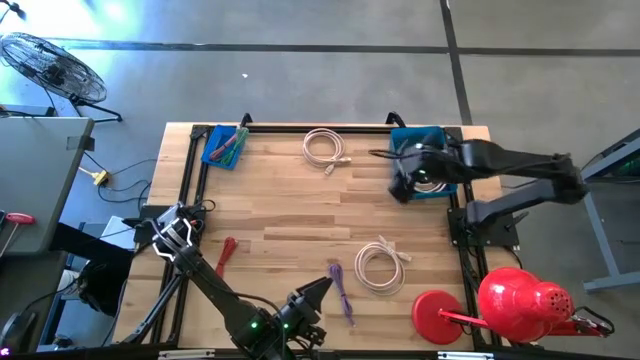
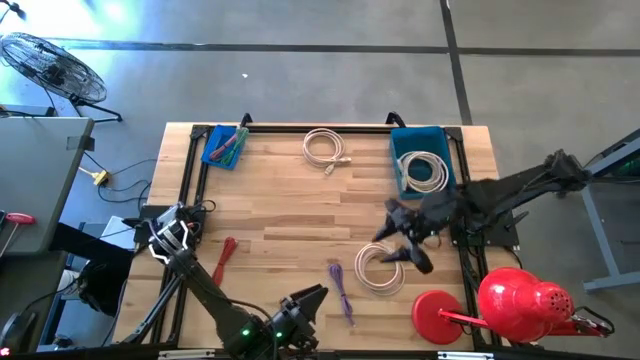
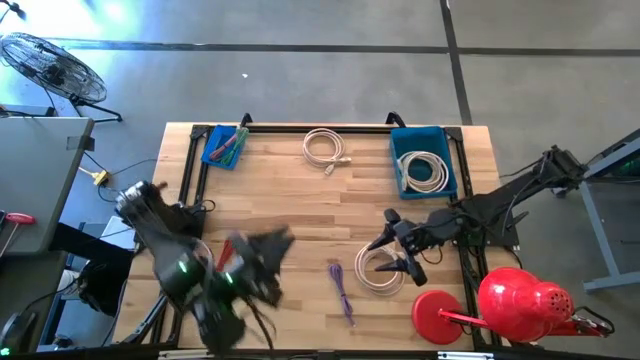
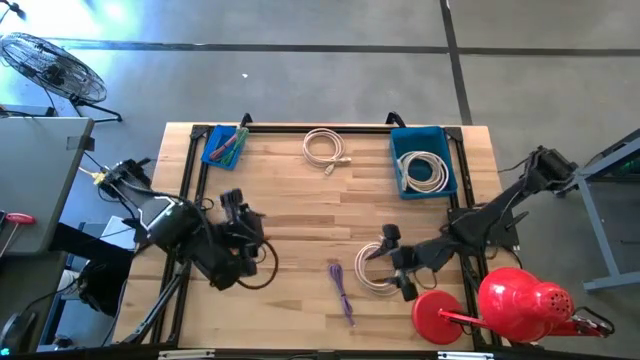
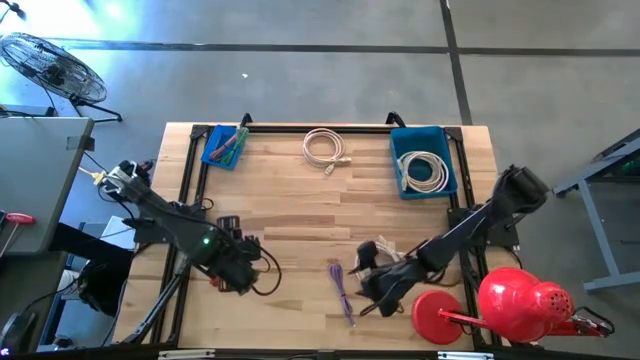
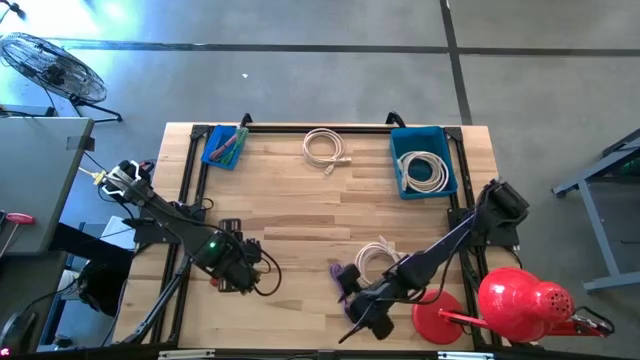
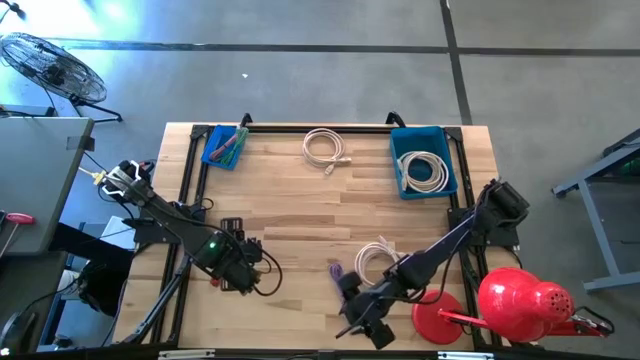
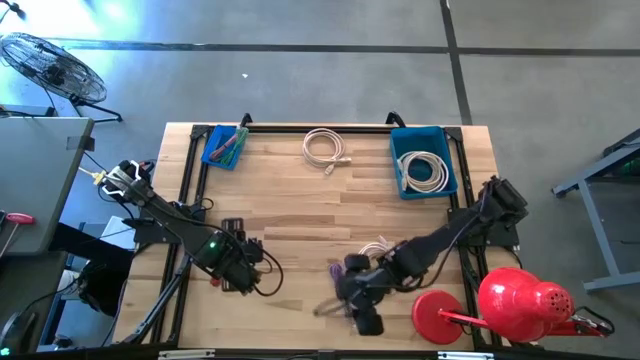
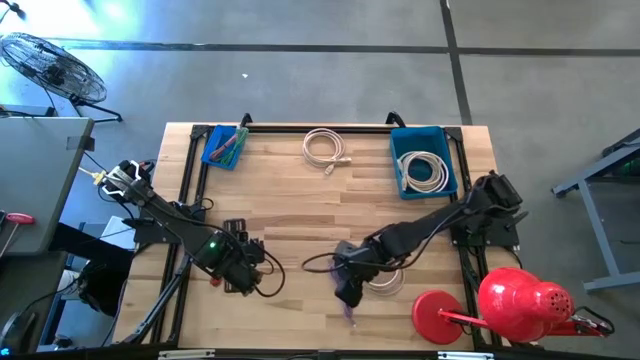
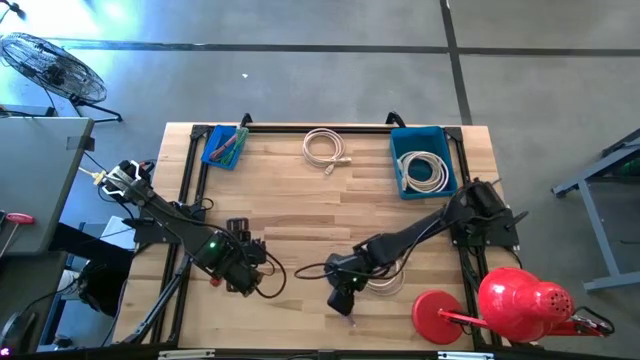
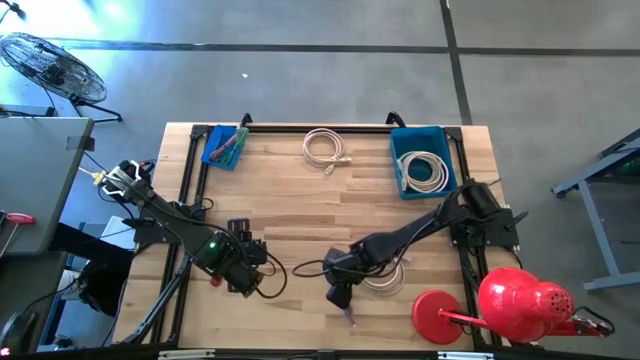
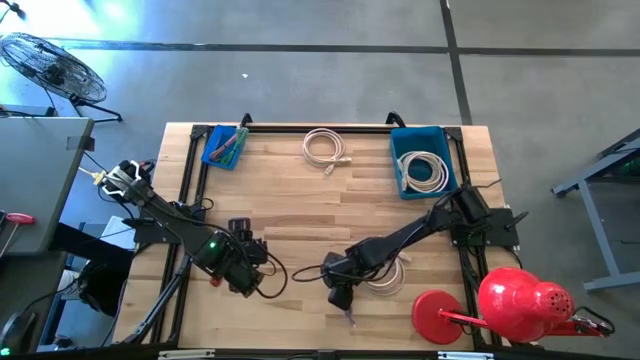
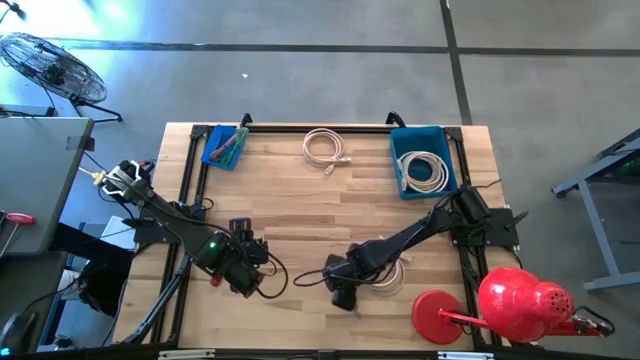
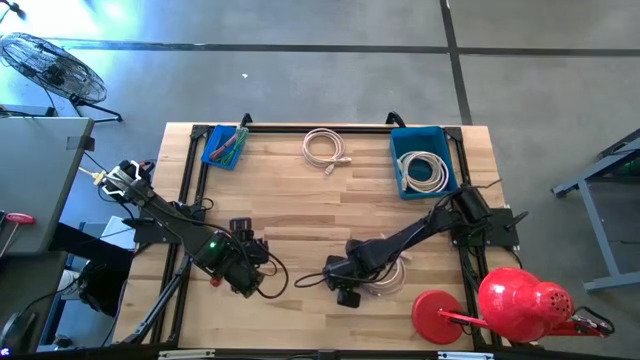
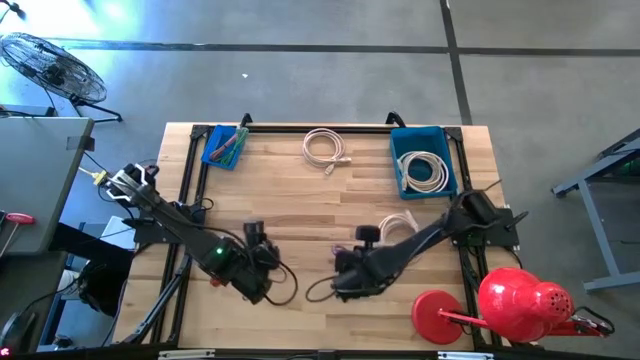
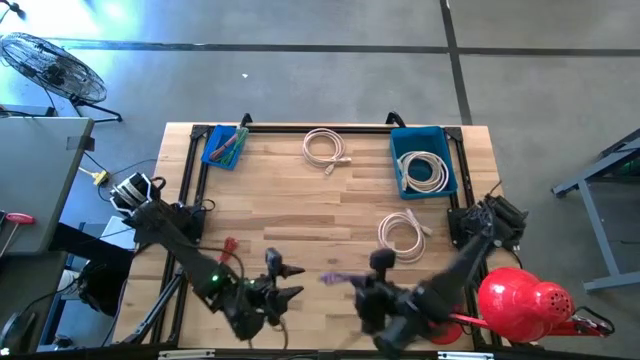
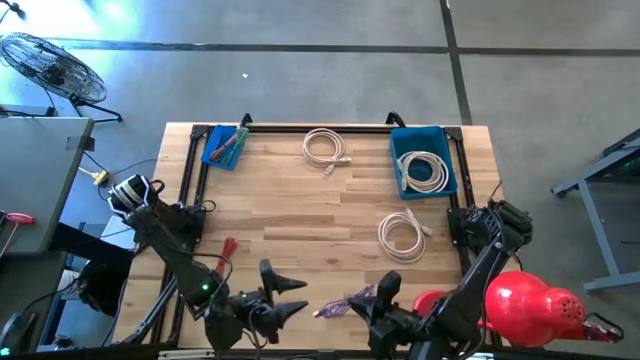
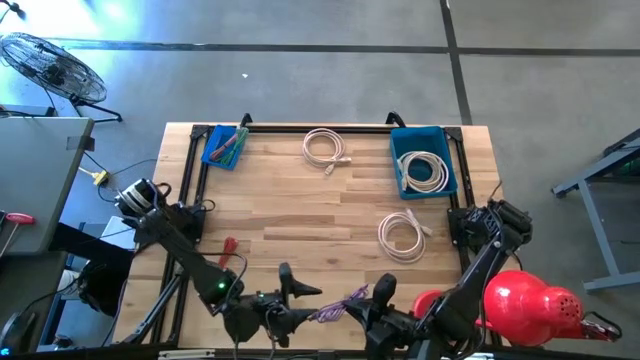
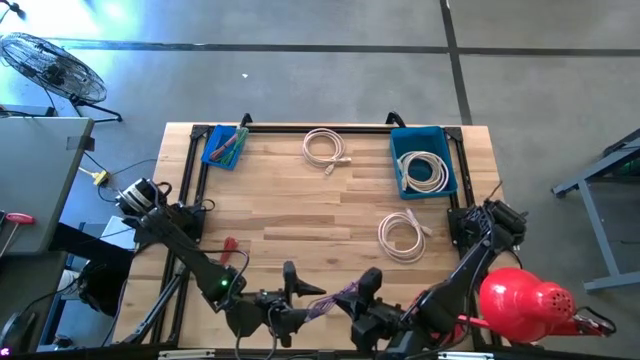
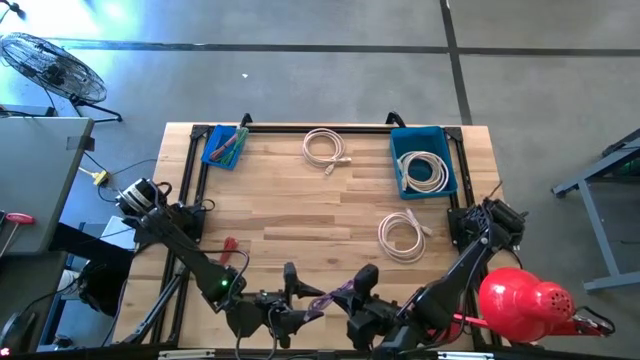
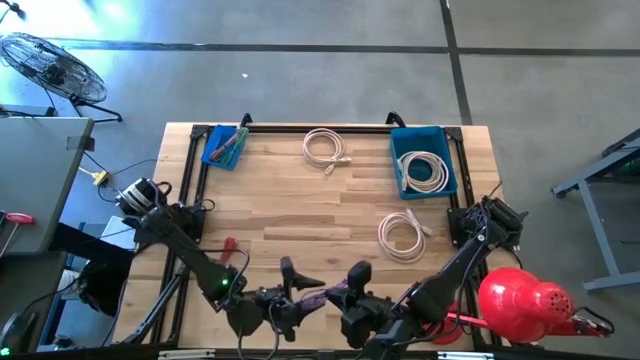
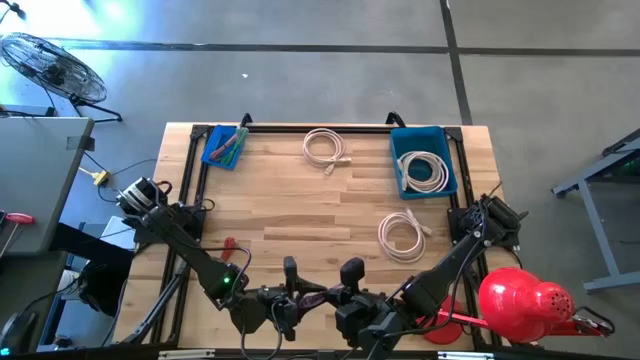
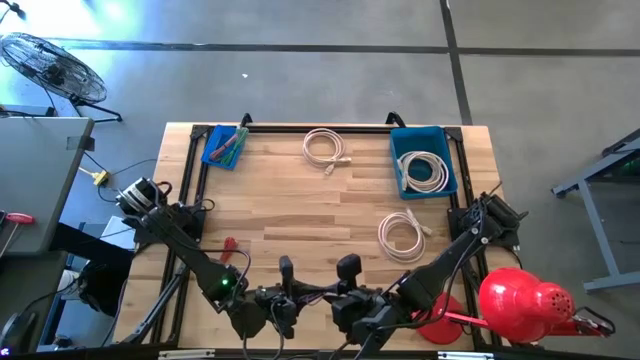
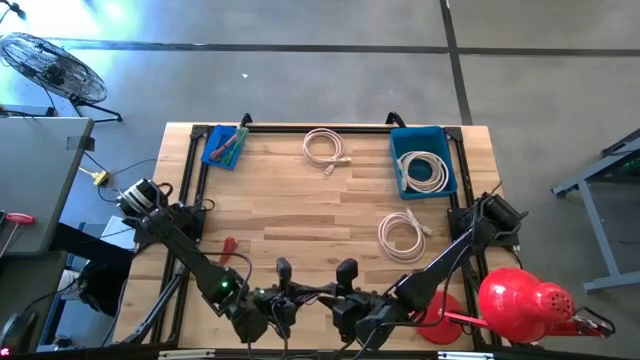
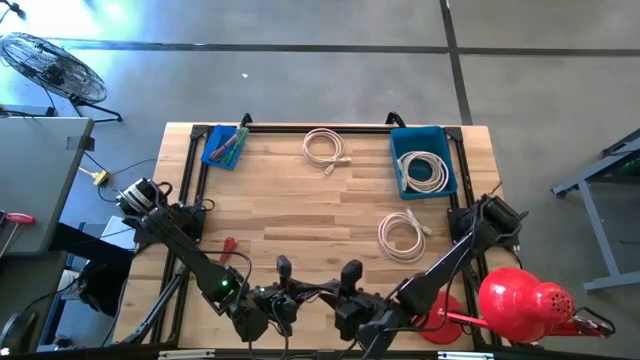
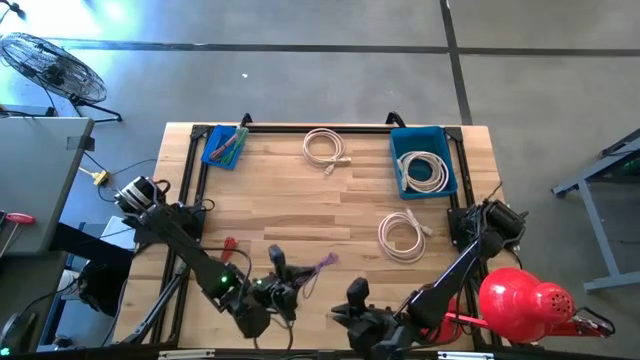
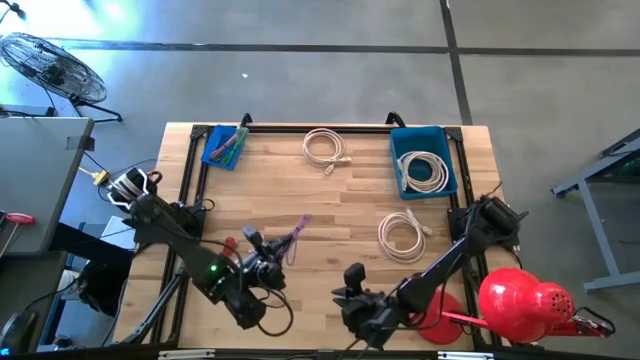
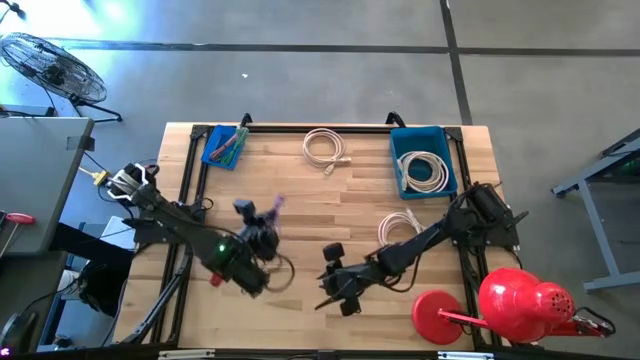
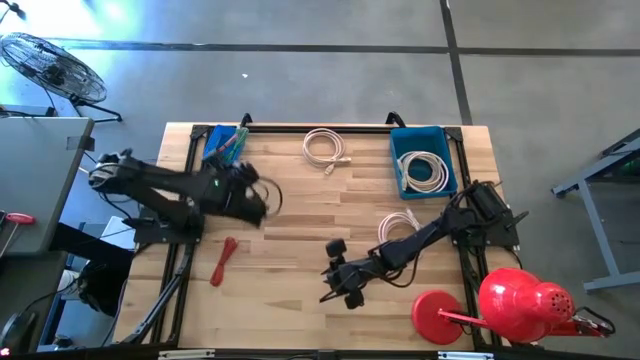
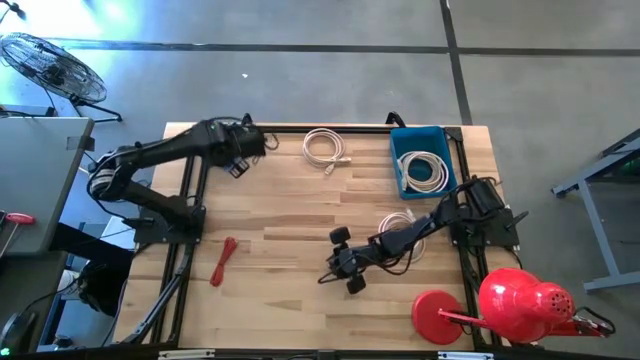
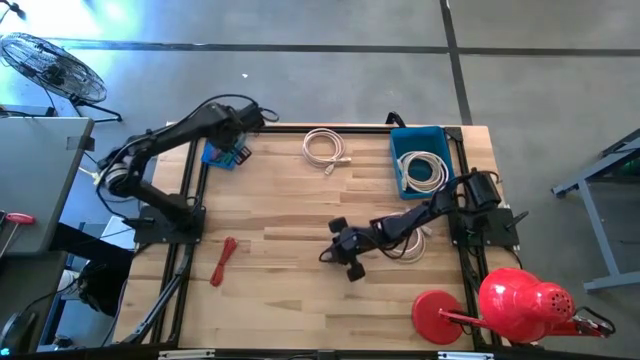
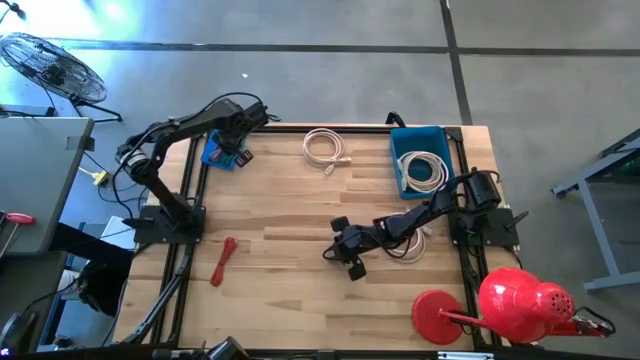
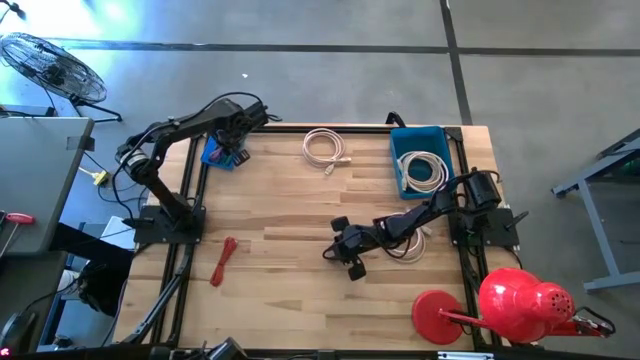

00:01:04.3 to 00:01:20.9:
Task: Pick & Place USB Port
Put the purple USB cable into the left blue bin

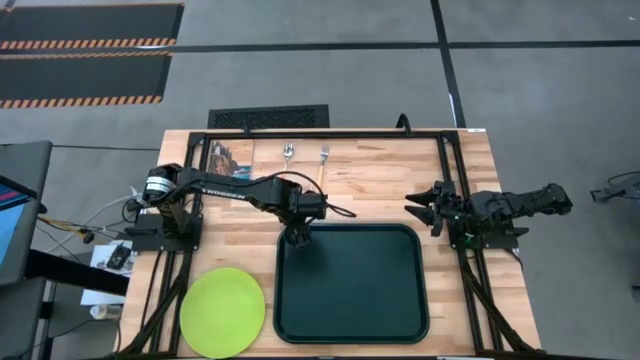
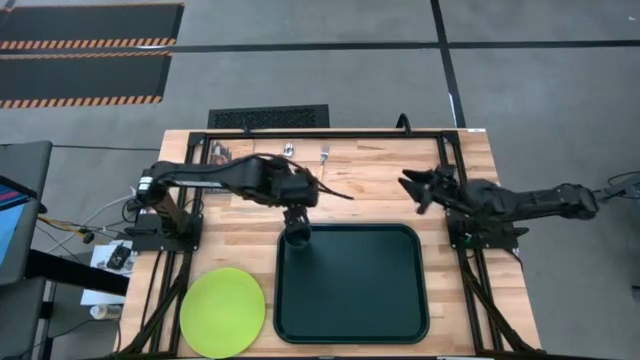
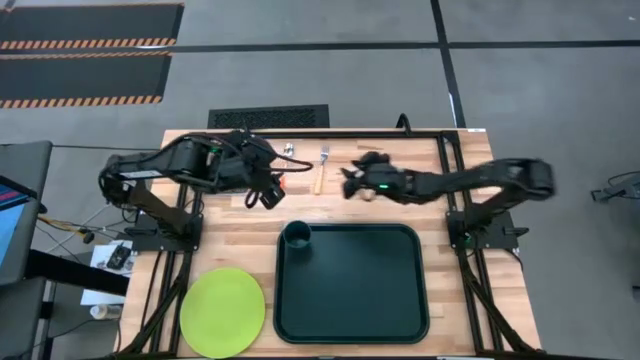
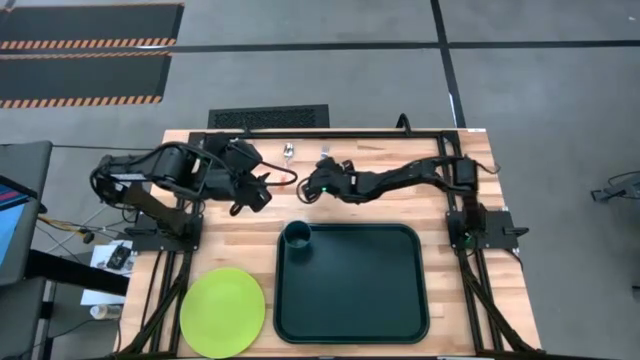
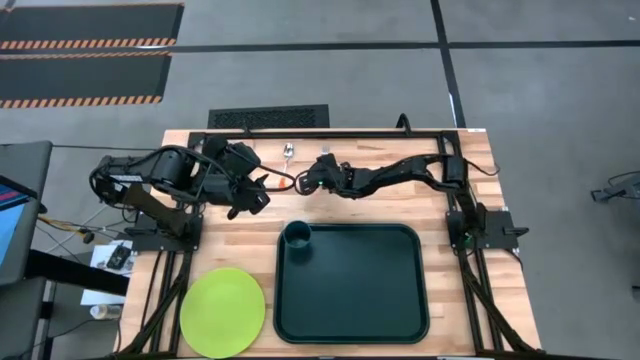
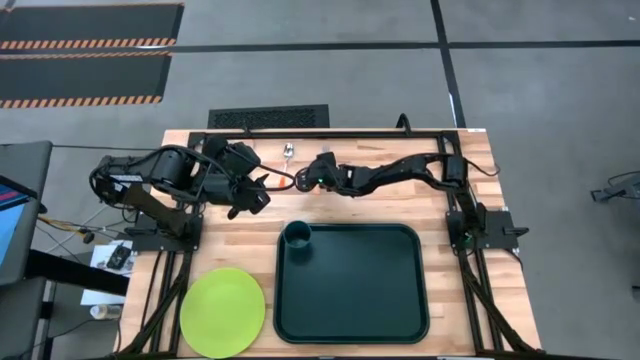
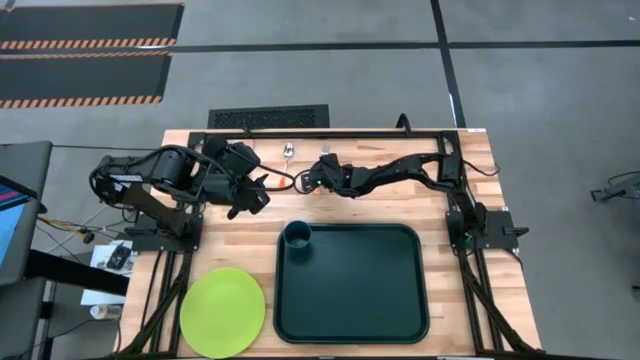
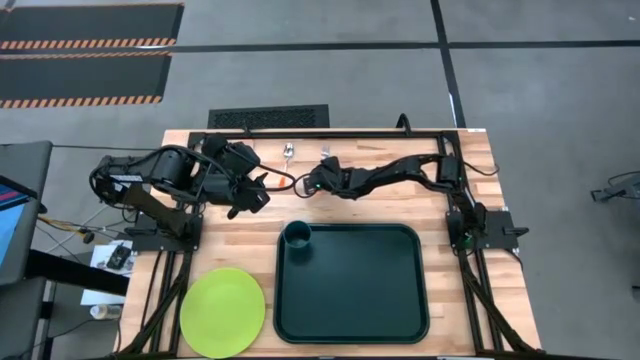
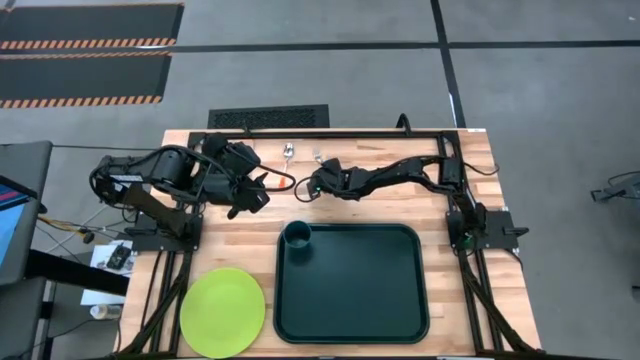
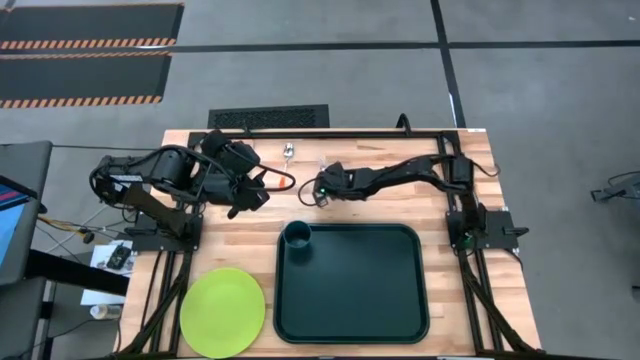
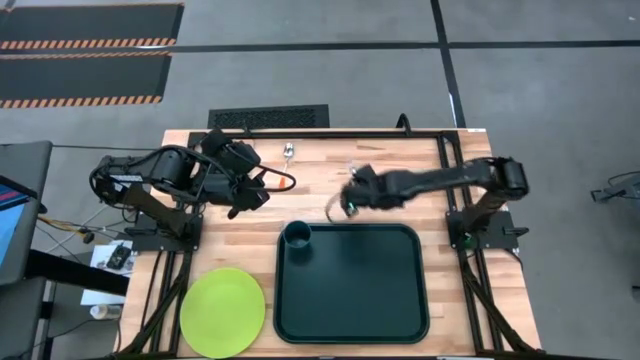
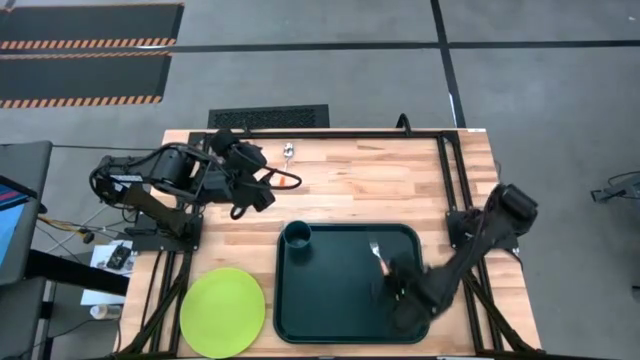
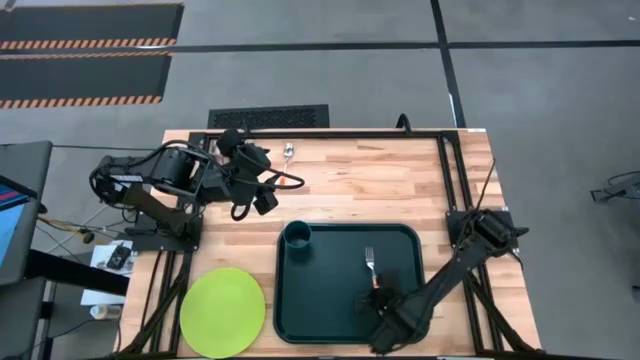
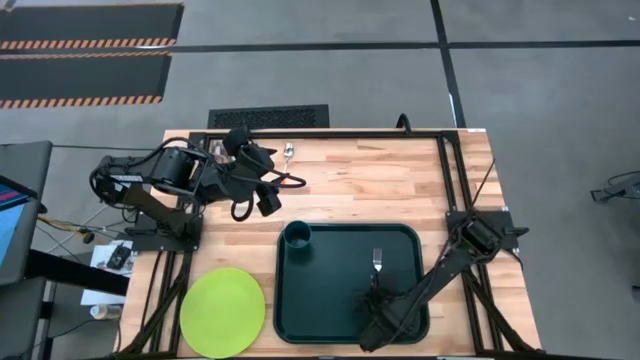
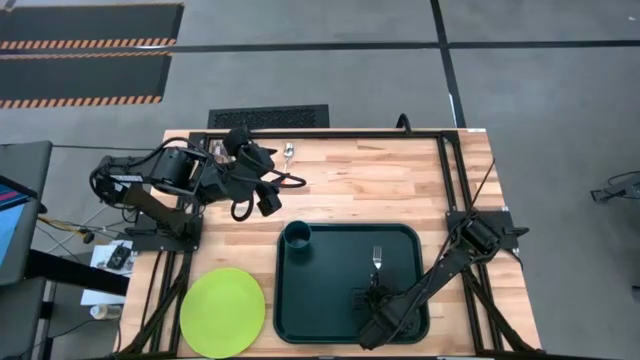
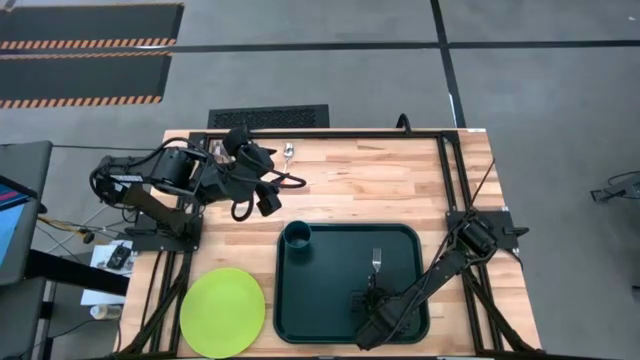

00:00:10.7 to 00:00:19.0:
Task: Pick and place plate/cup/fork/spoon on tray
Put the light orange fork on the black tray to the bottom right of the dark blue glass
